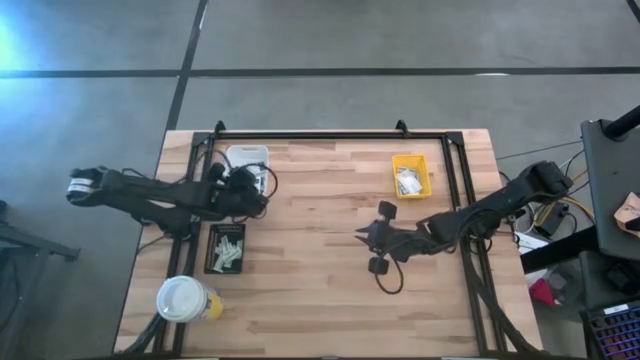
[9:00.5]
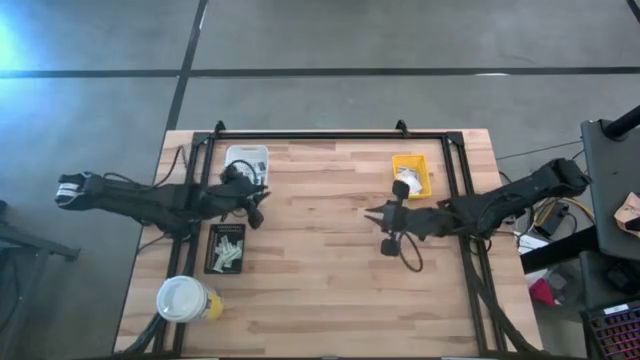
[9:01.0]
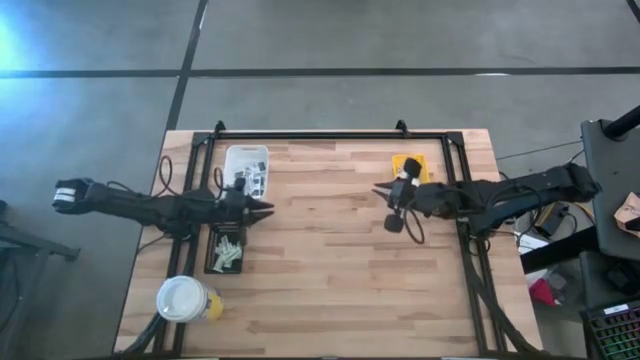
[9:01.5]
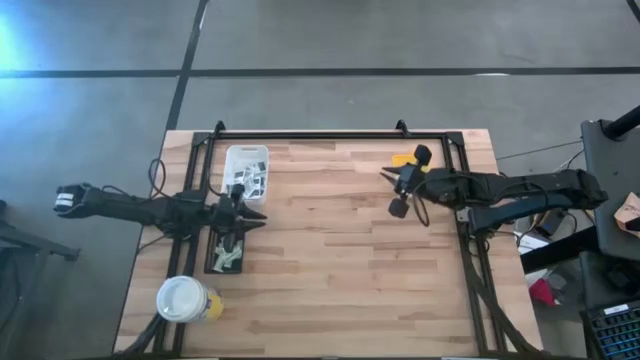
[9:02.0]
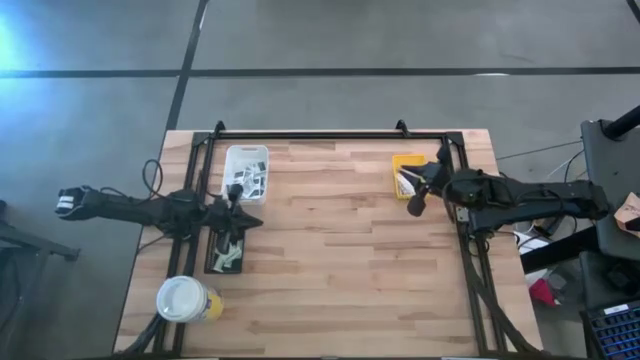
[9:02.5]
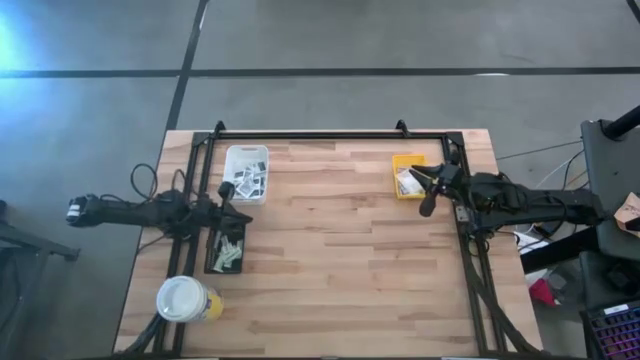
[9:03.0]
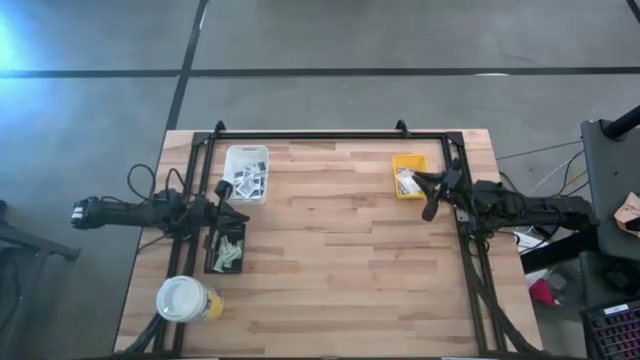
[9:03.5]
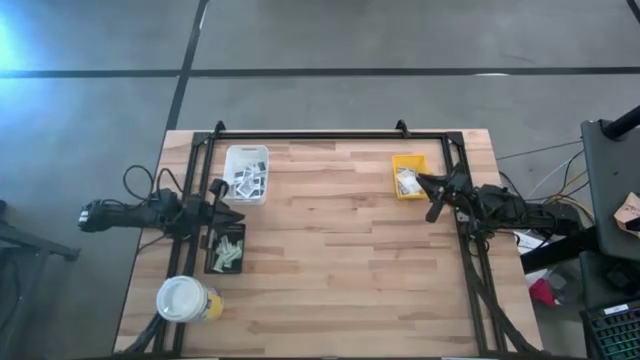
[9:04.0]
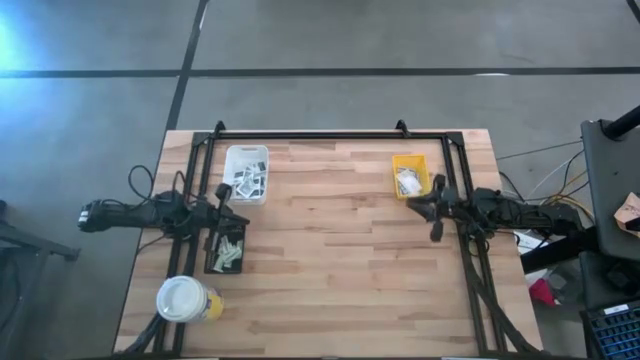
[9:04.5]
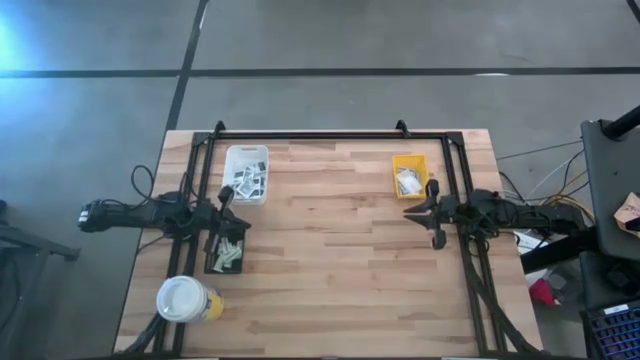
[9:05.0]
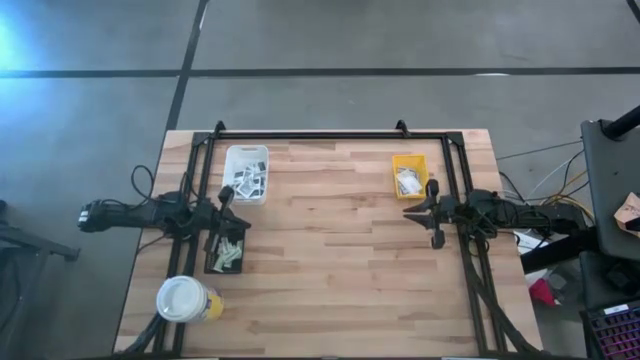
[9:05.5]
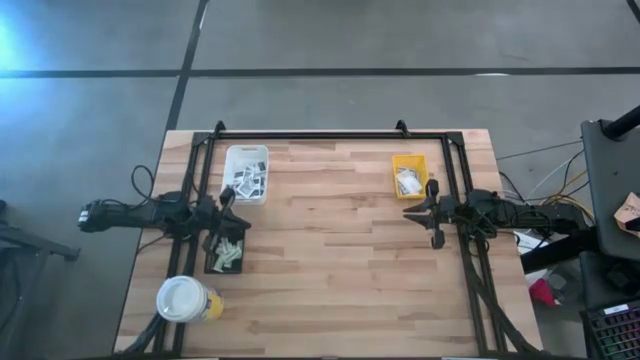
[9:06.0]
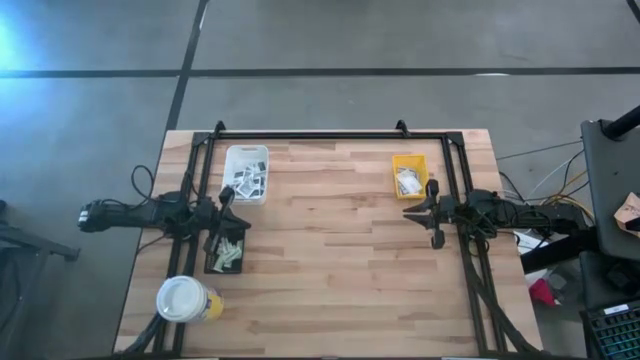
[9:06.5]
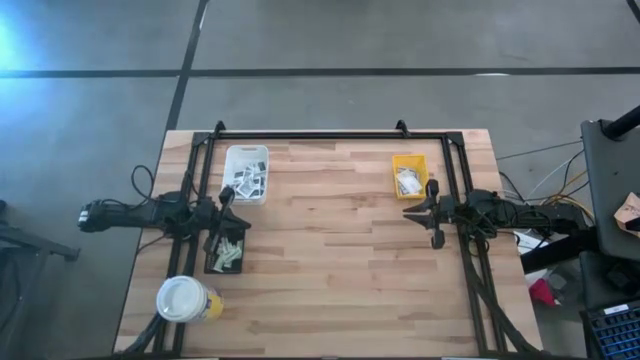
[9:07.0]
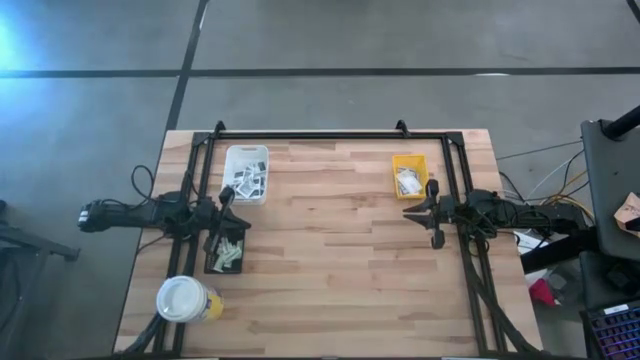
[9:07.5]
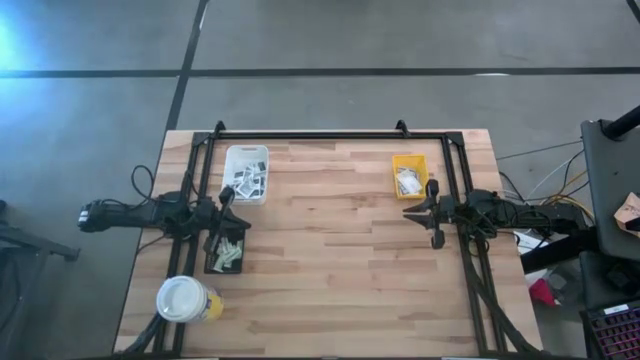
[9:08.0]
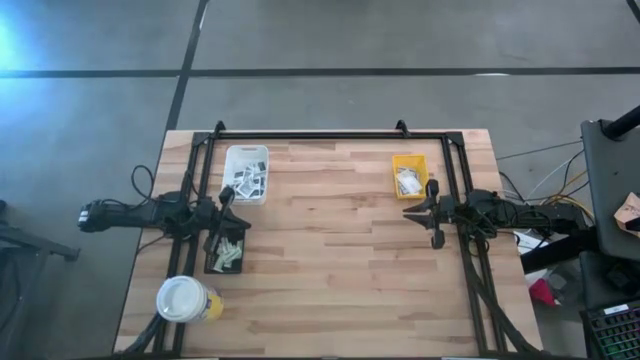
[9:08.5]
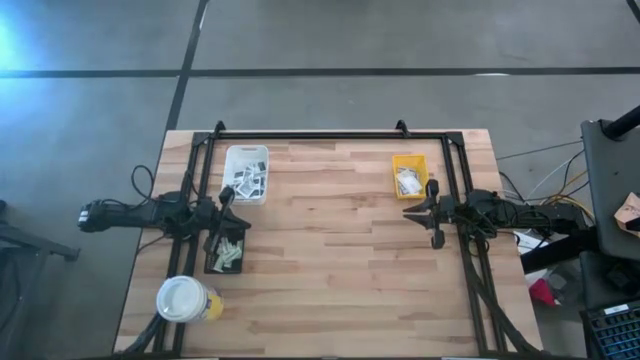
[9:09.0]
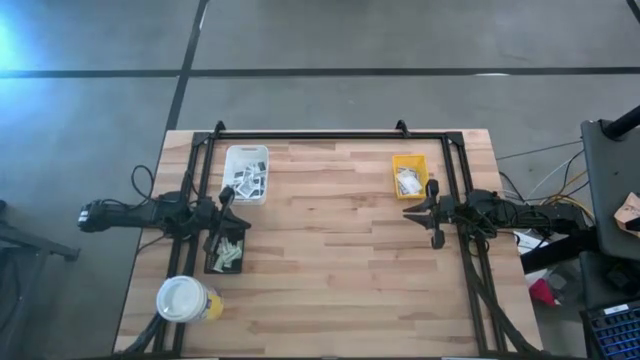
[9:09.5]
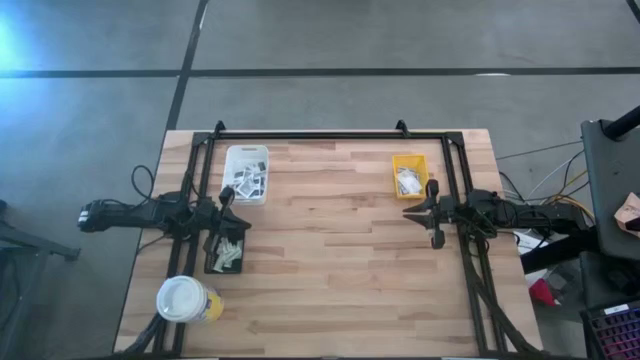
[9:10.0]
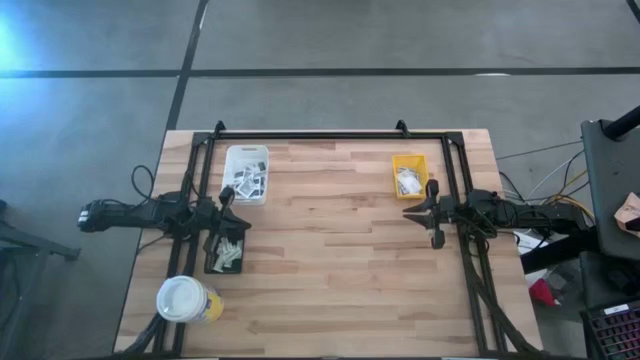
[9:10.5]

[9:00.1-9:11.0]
Task: Pick & Place First Aid Supplies
Return to Home Position

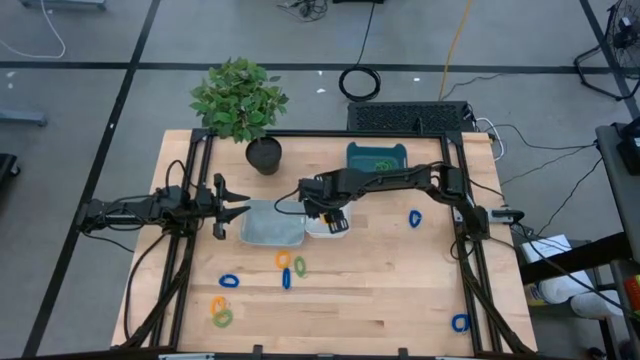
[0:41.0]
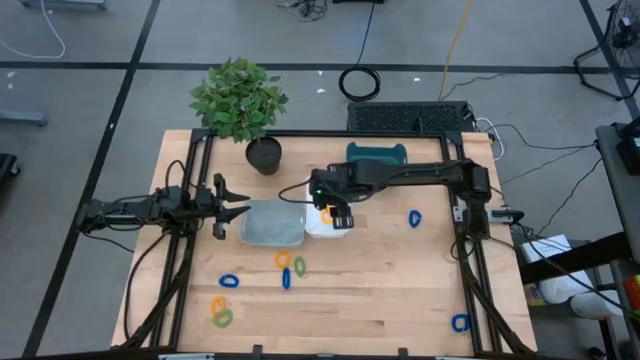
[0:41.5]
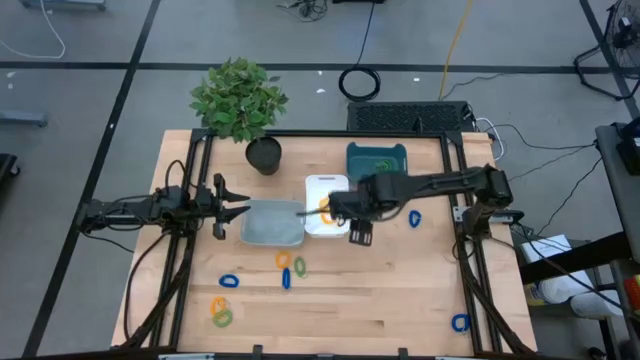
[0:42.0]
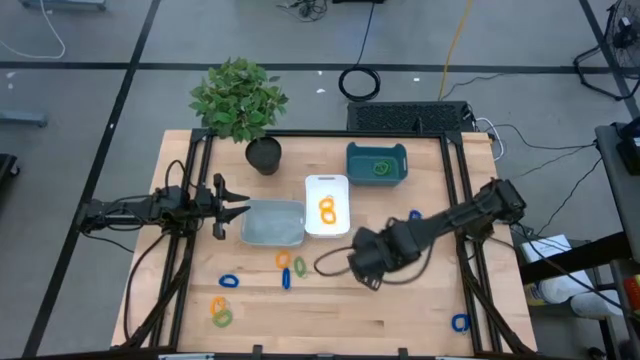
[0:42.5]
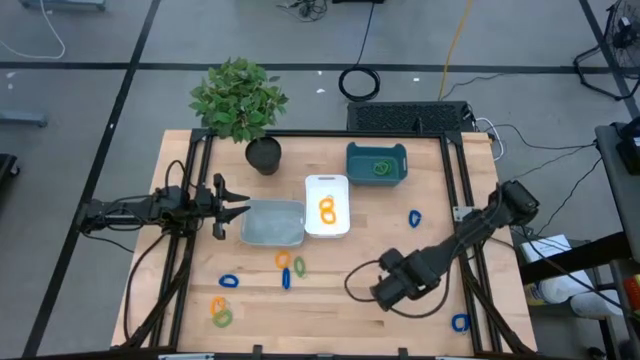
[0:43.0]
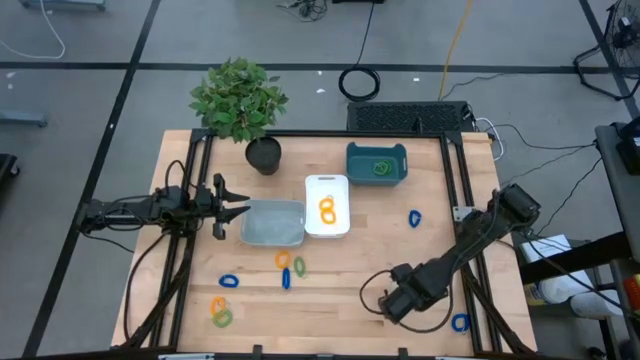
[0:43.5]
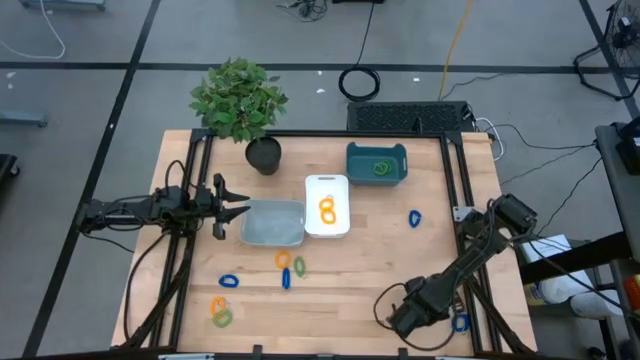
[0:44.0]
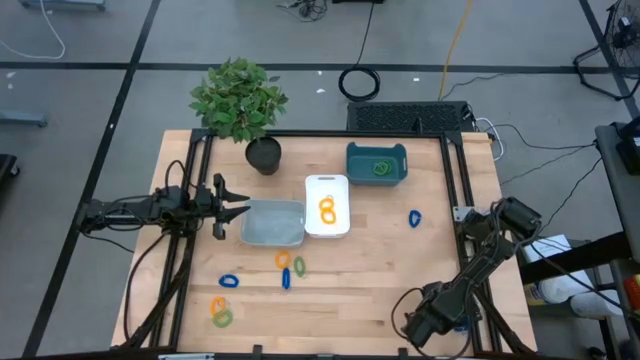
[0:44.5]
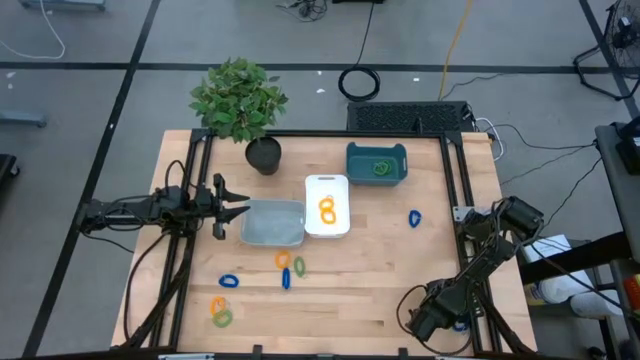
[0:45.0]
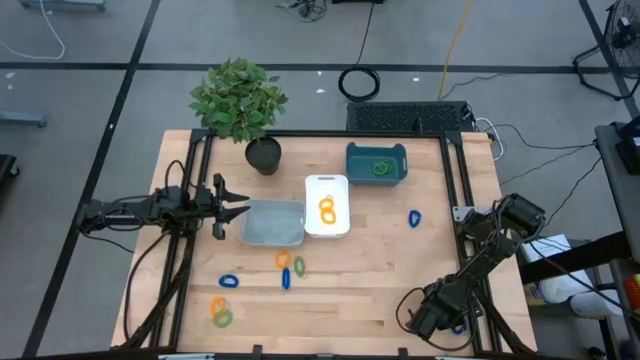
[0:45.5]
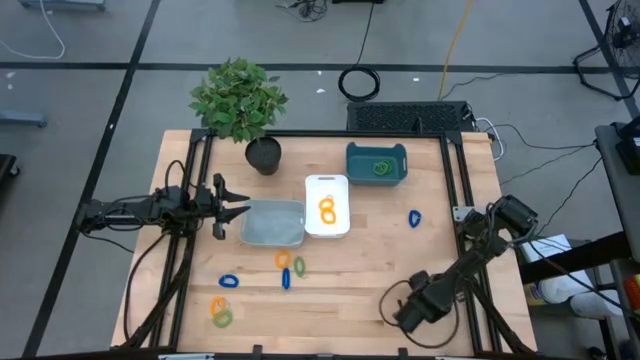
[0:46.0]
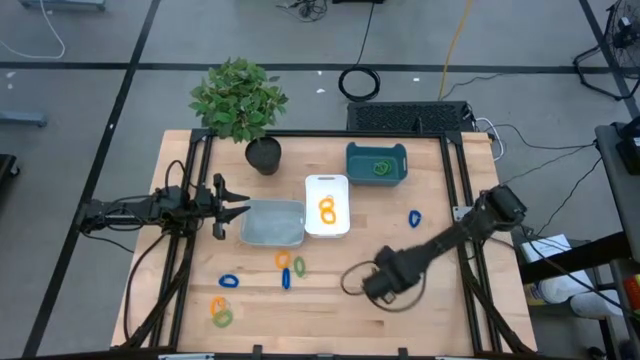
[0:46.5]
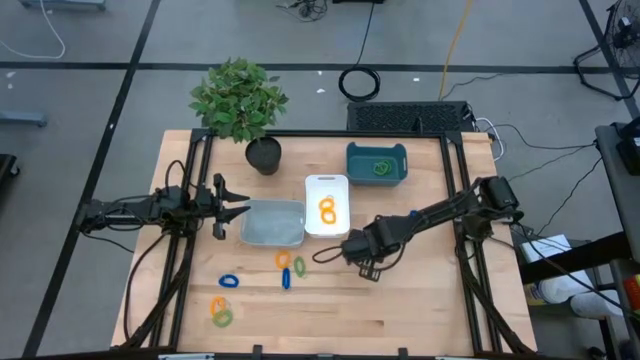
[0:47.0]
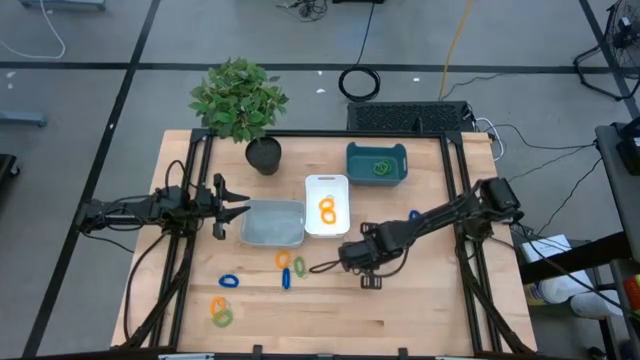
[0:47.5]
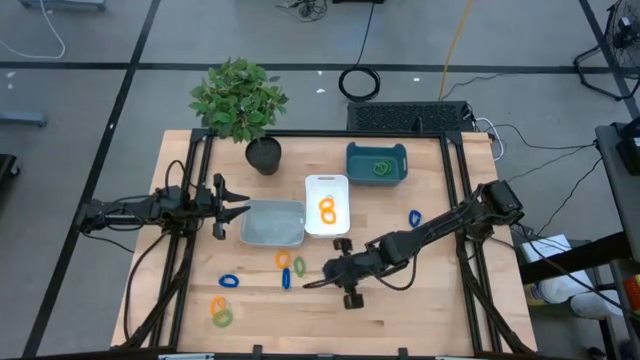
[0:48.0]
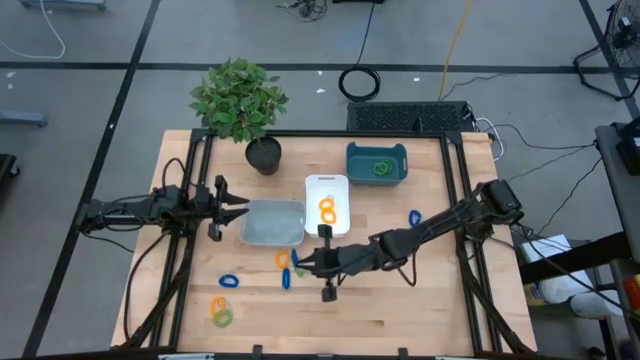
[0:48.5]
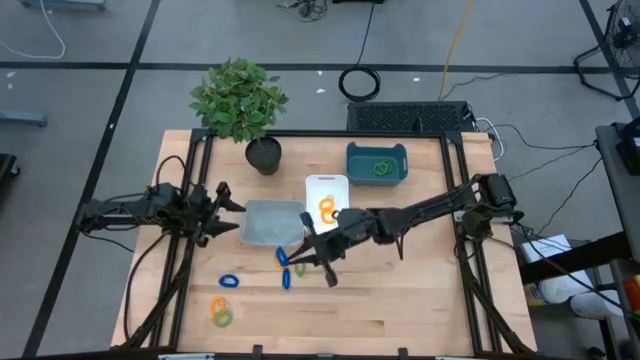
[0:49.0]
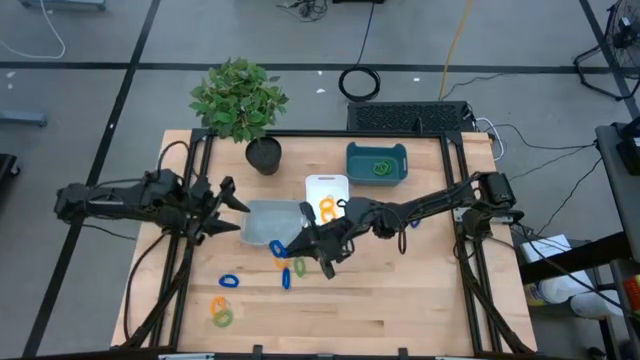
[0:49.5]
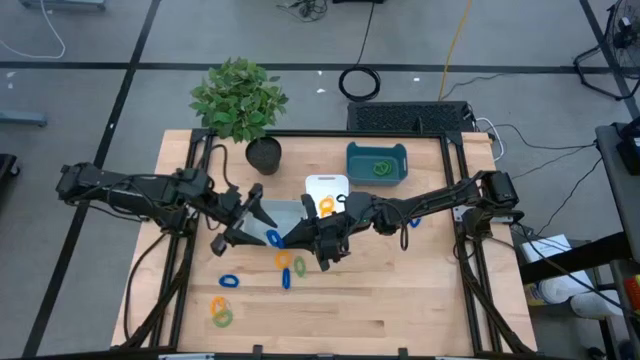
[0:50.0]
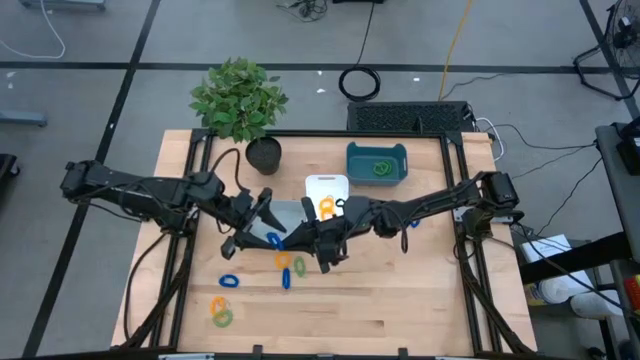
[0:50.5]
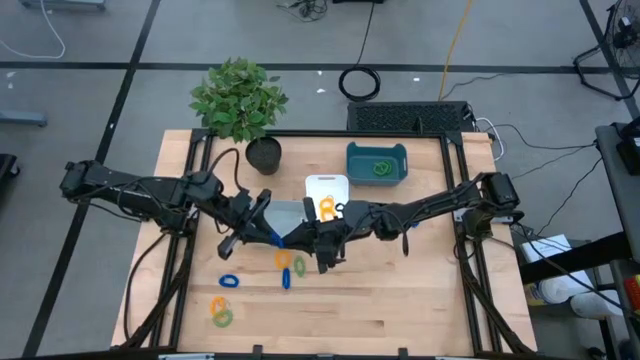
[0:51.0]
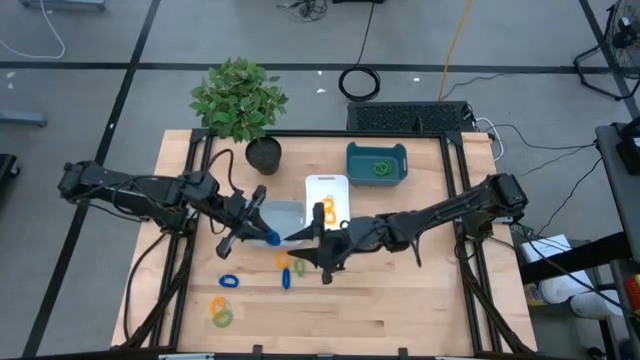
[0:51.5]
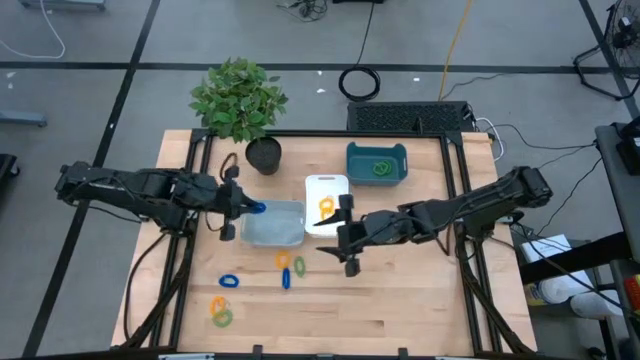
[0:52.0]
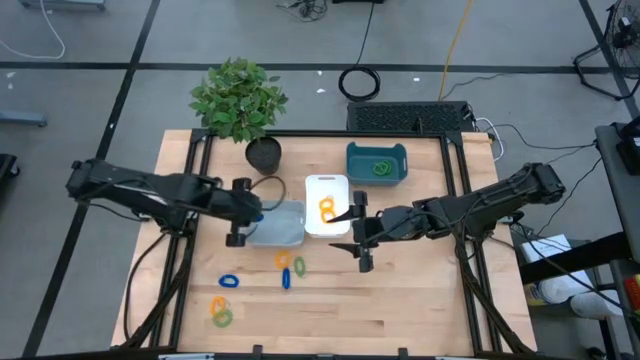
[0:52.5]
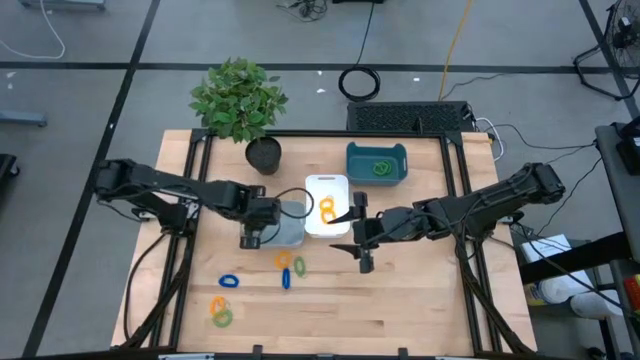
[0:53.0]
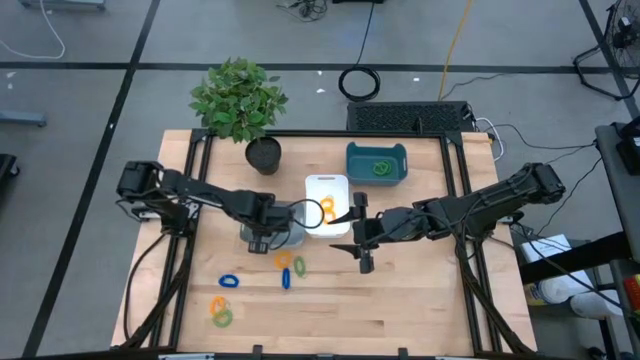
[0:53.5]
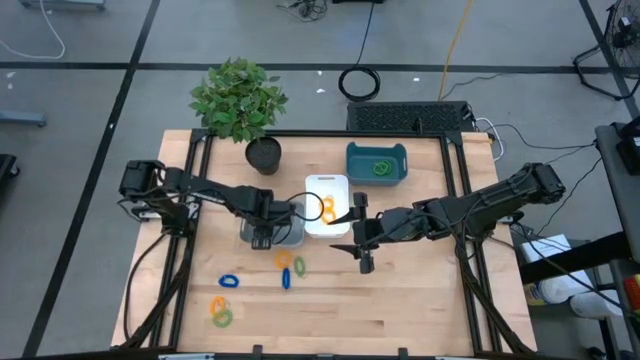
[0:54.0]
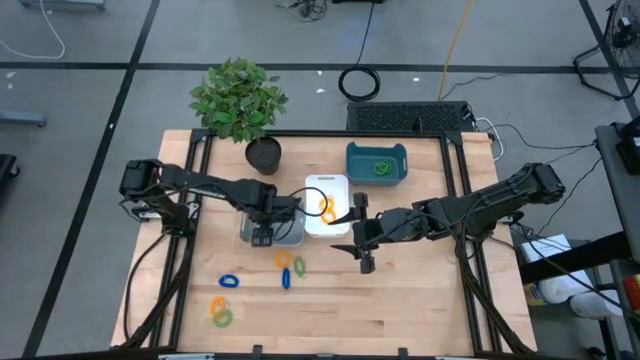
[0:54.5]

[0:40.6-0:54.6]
Task: Sort spring keychains
Put the blue spring keychain into the gray bin
